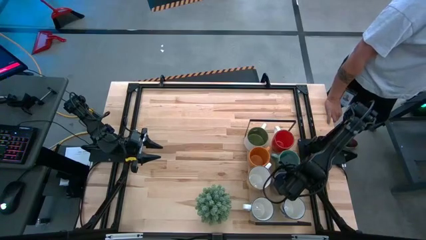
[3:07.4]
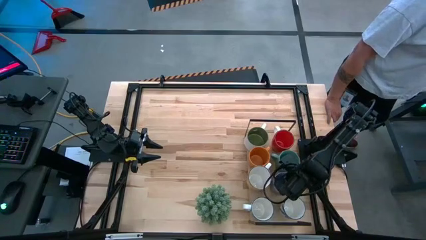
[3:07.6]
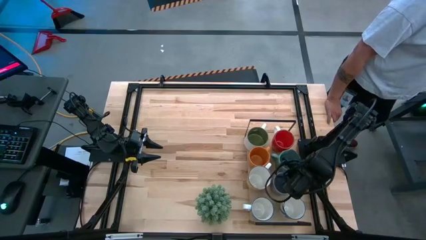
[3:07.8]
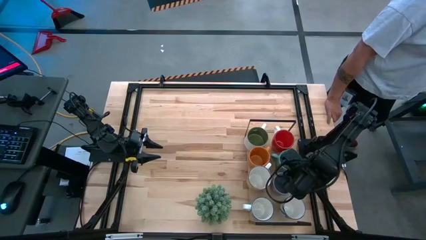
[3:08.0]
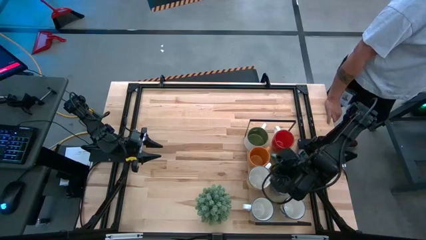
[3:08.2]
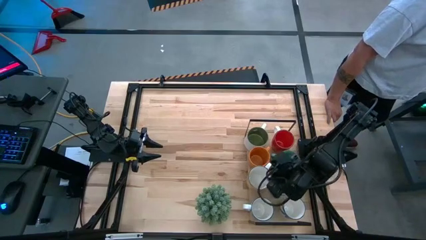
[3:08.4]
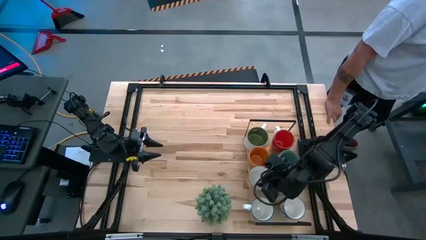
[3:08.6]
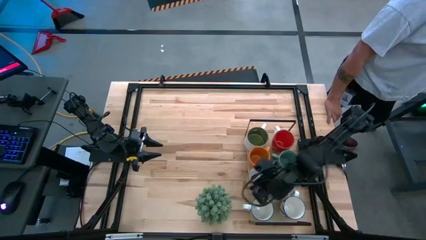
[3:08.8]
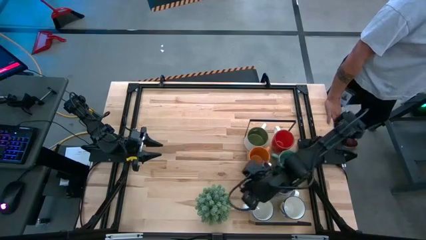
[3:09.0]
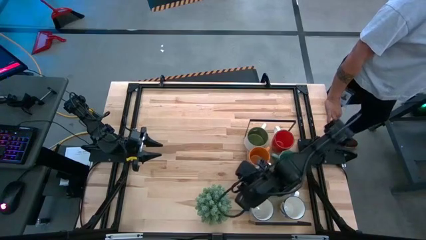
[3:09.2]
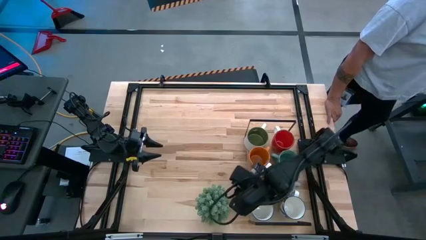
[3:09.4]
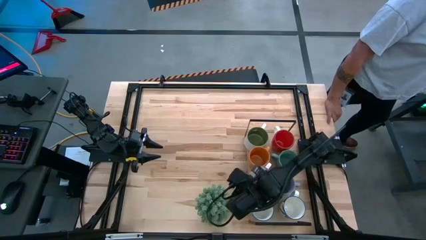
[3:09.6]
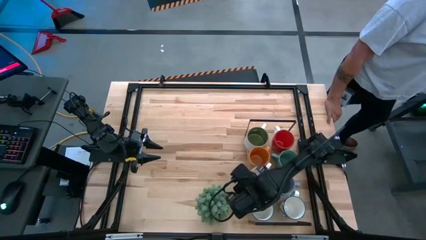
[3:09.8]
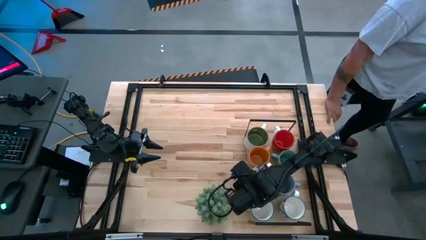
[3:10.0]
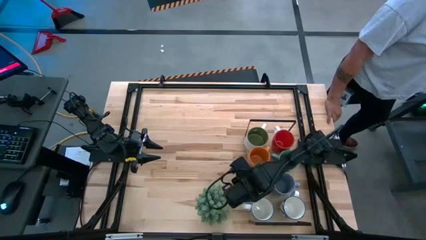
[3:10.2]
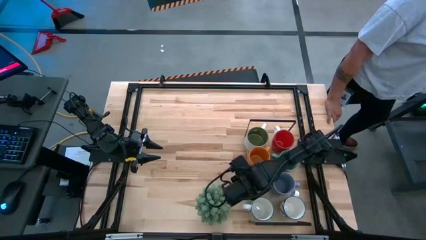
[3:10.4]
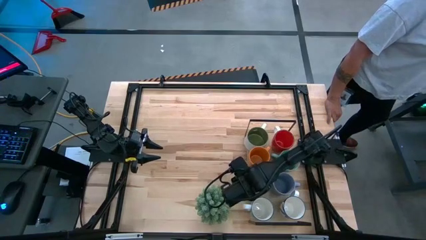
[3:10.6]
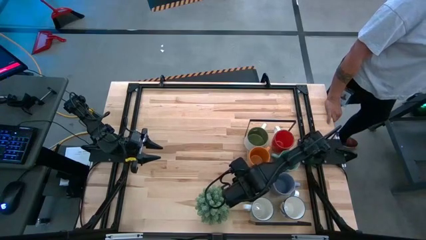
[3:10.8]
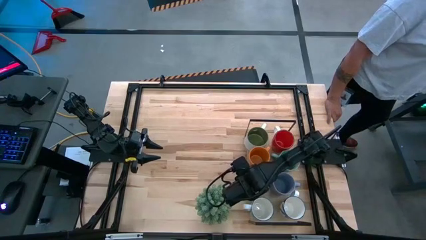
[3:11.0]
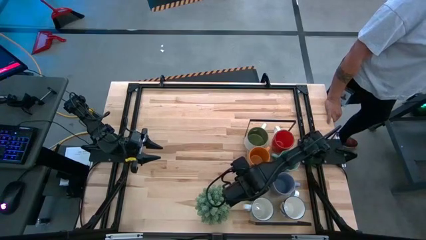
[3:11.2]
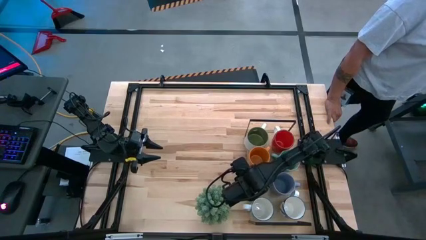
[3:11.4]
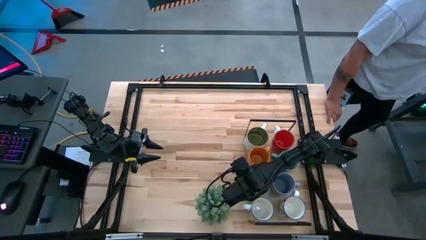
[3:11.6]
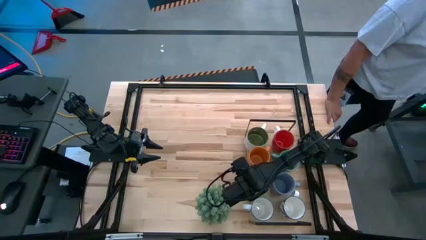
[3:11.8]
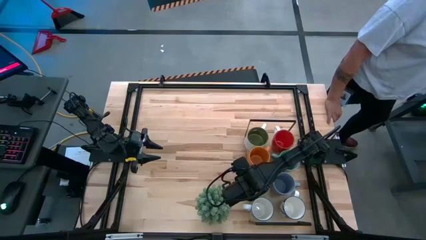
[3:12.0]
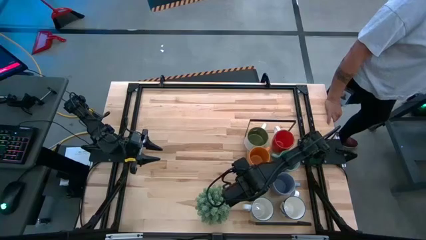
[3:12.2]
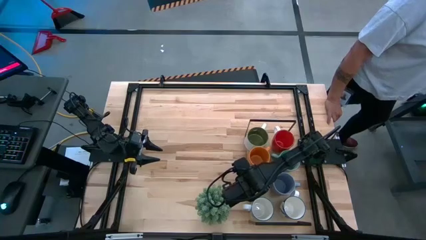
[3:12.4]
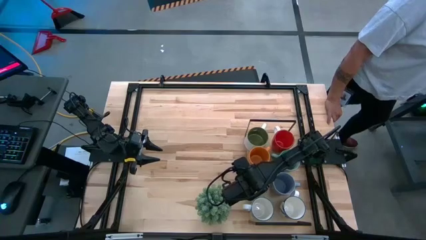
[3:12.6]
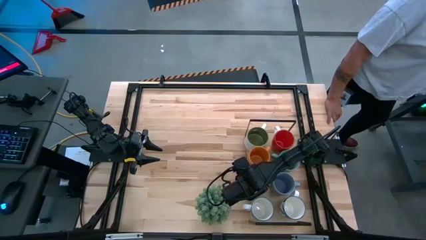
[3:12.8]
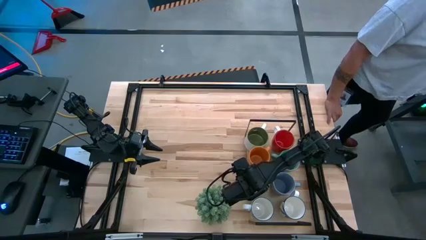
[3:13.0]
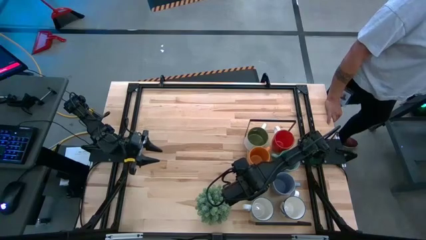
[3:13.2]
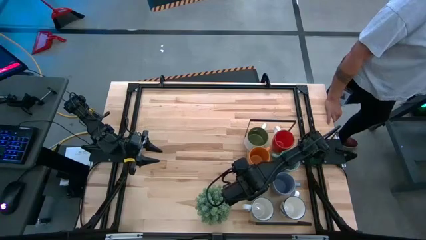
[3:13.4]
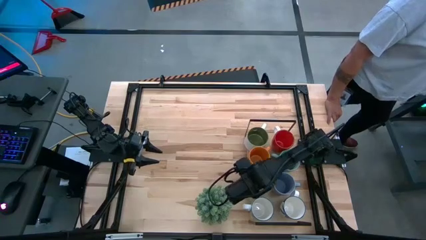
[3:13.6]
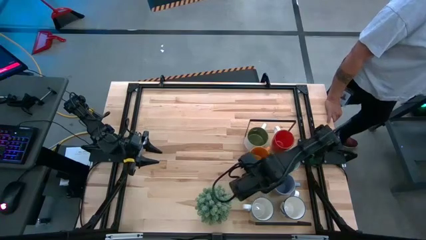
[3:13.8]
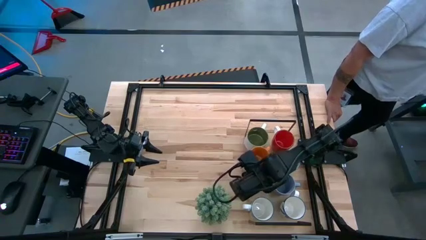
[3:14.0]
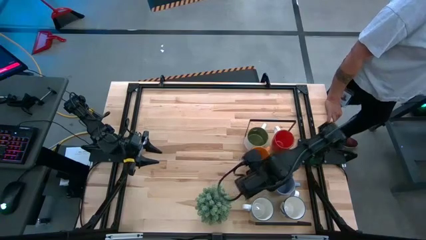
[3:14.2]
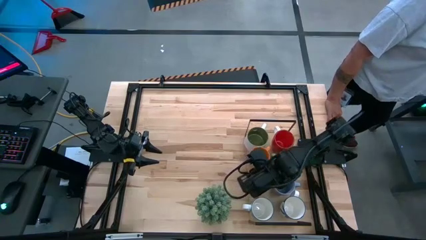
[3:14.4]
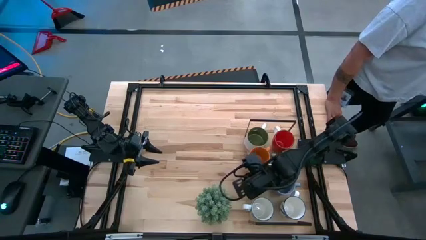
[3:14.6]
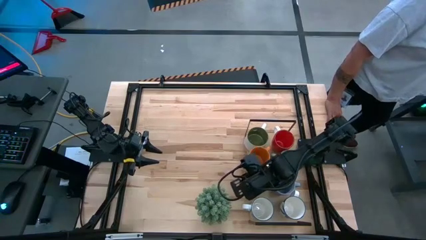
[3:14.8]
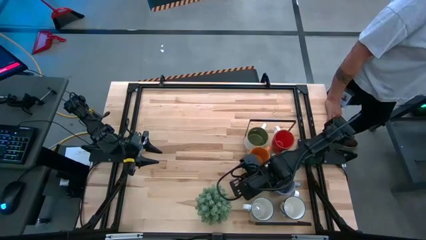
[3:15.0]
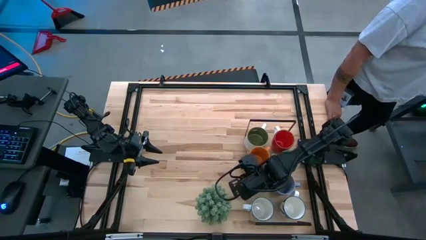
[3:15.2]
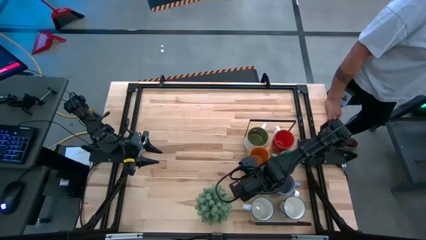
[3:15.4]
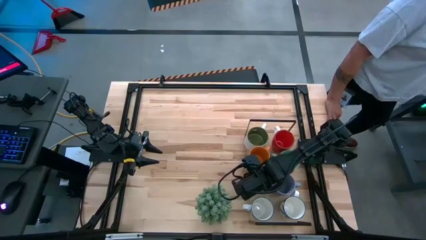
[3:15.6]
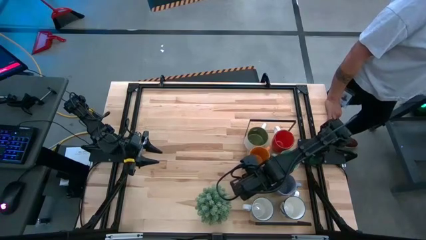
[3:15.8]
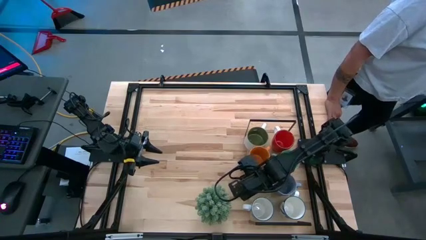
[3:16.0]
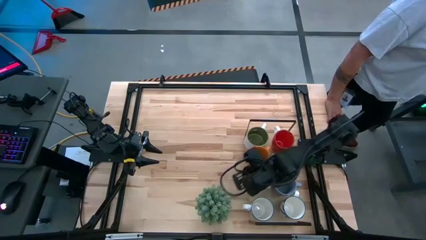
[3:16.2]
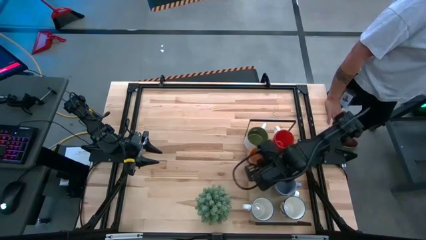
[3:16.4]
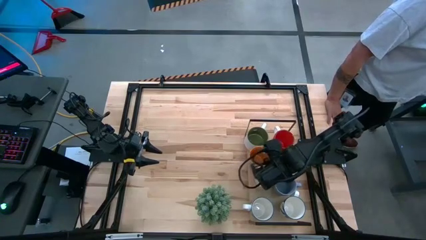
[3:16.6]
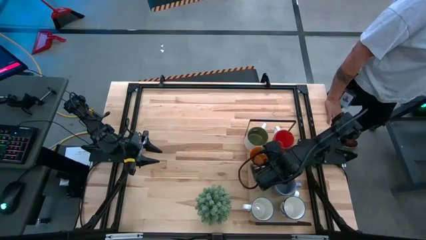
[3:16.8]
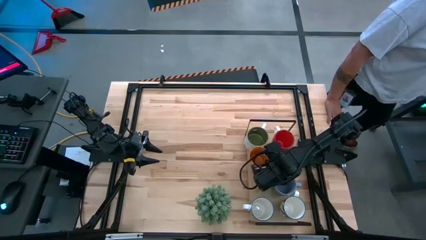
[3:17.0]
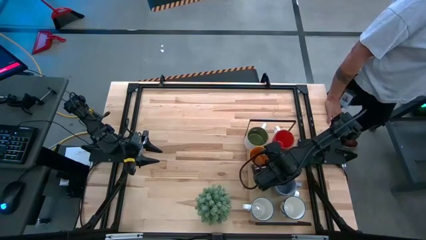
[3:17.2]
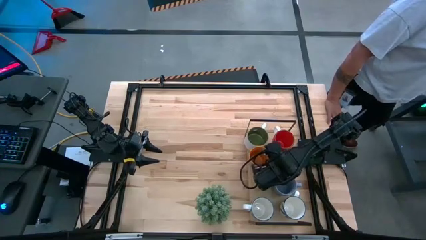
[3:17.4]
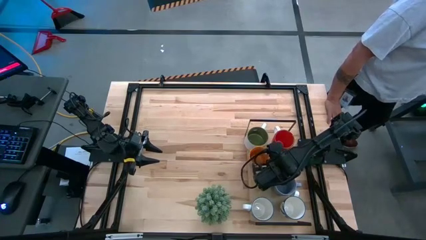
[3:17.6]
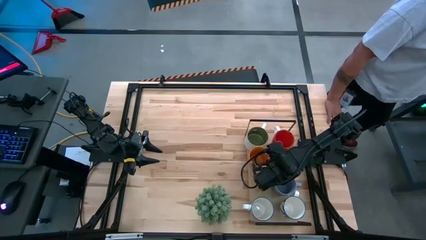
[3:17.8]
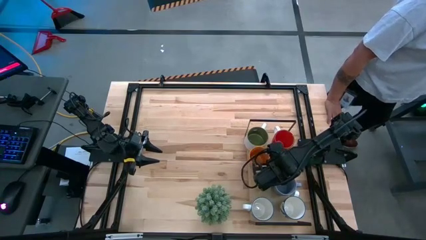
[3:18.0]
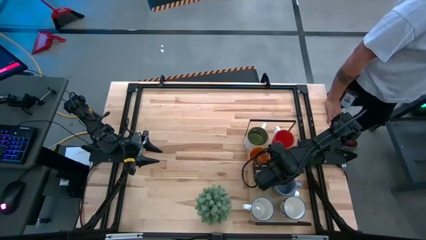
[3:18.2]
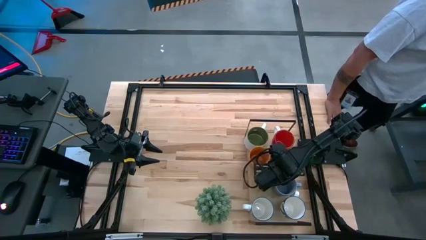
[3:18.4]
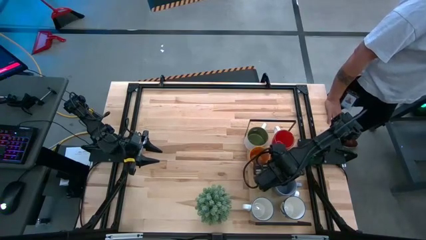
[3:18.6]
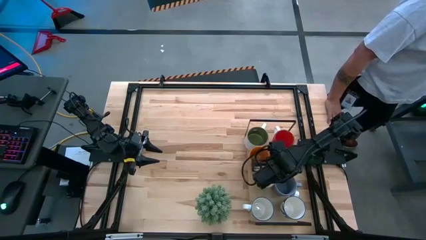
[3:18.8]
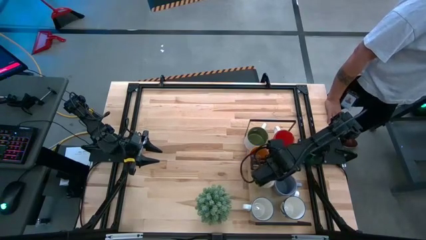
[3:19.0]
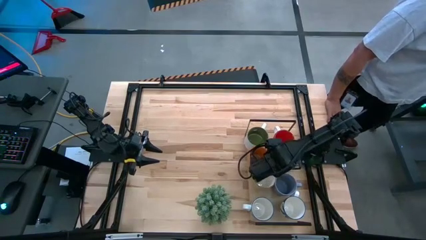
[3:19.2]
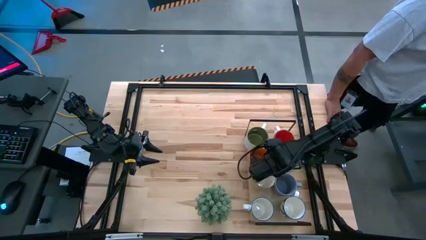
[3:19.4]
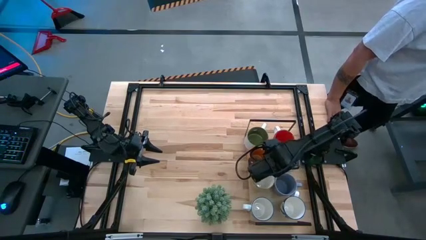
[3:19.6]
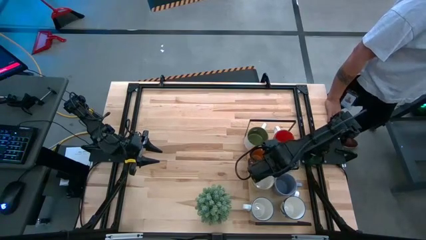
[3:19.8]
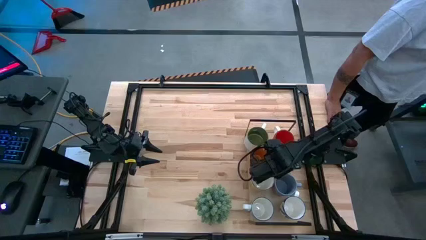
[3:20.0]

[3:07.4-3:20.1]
Task: Place coffee mugs
Adjust the mugs on the shelf

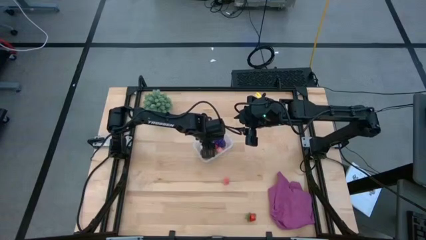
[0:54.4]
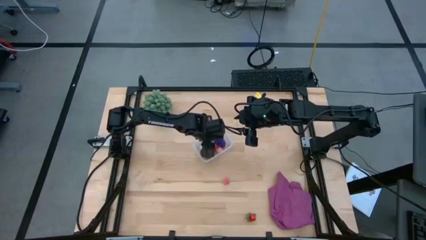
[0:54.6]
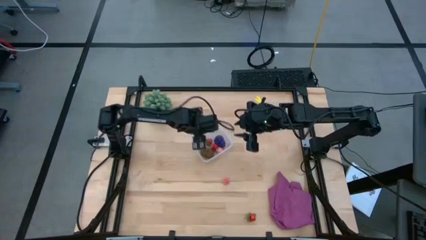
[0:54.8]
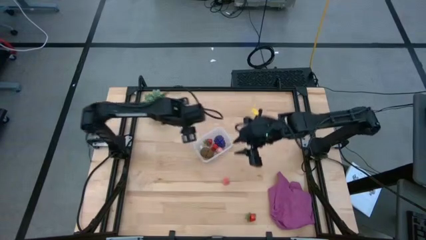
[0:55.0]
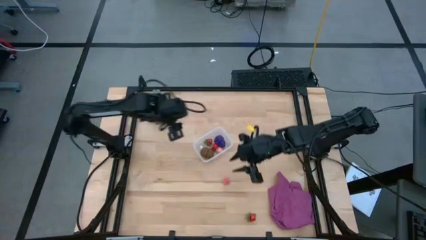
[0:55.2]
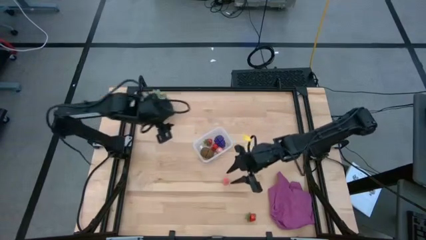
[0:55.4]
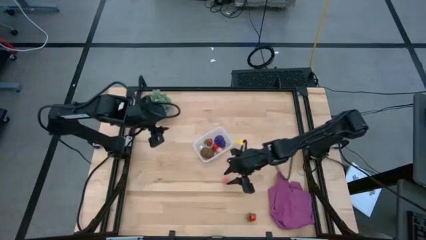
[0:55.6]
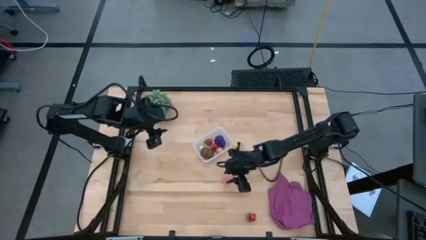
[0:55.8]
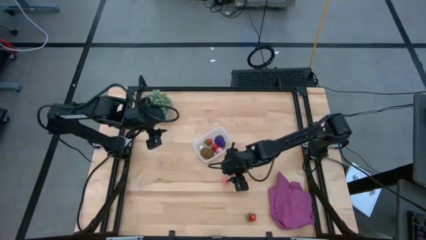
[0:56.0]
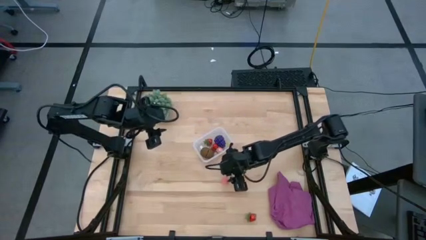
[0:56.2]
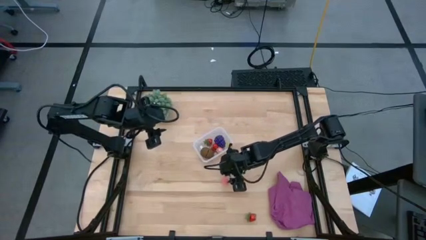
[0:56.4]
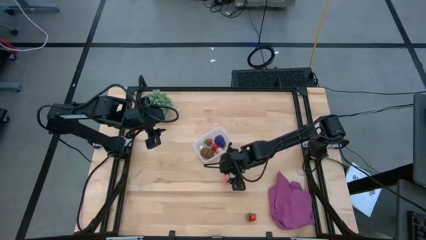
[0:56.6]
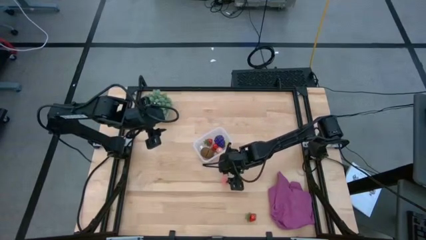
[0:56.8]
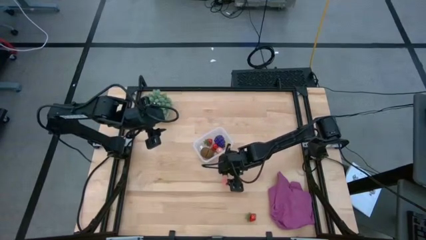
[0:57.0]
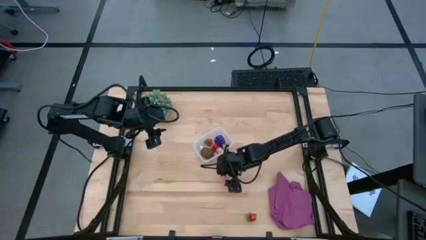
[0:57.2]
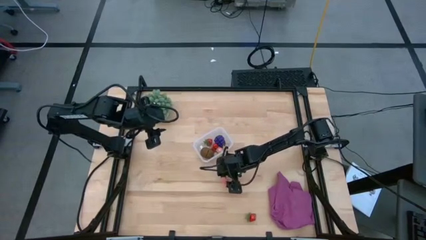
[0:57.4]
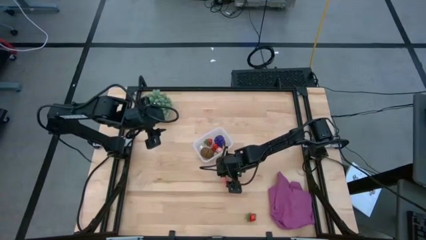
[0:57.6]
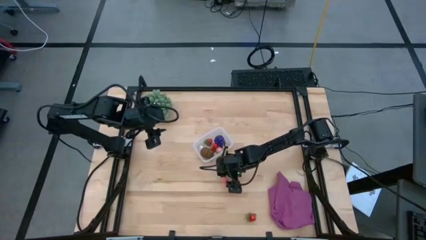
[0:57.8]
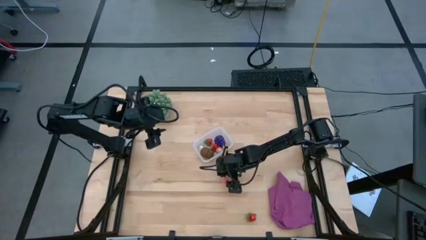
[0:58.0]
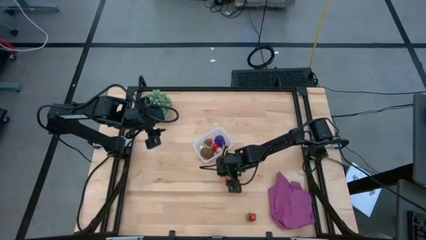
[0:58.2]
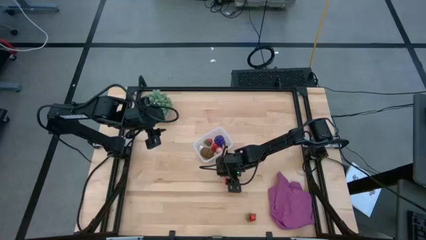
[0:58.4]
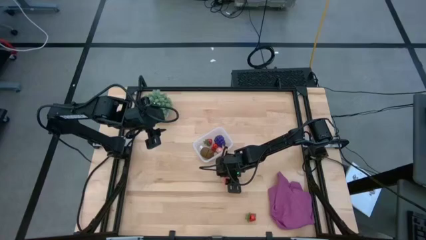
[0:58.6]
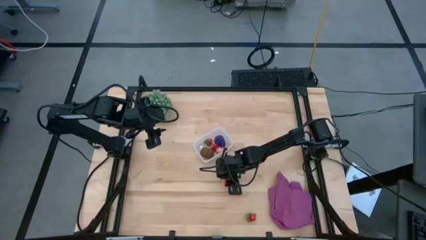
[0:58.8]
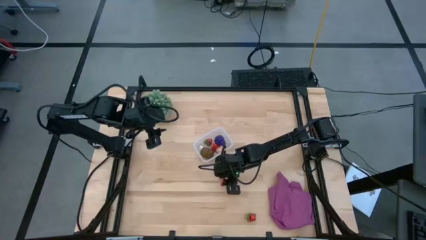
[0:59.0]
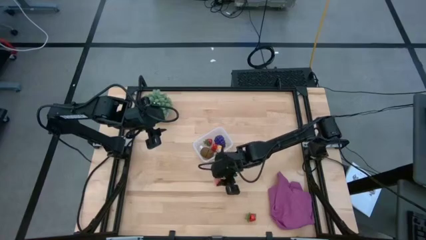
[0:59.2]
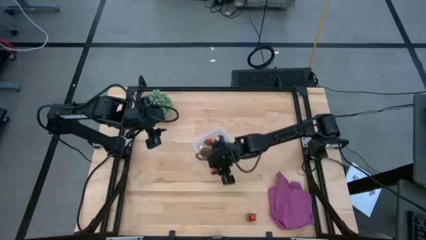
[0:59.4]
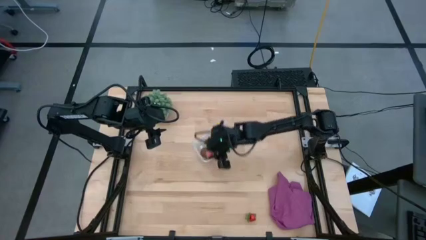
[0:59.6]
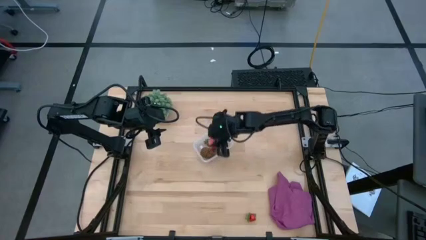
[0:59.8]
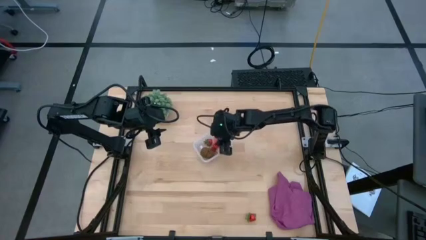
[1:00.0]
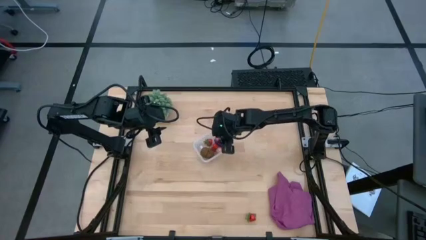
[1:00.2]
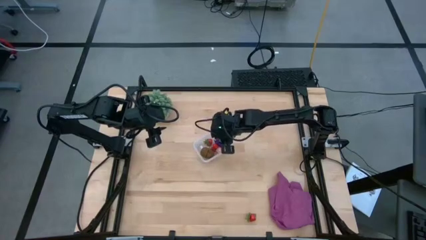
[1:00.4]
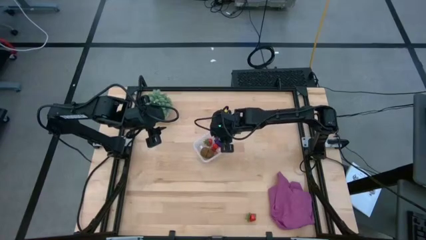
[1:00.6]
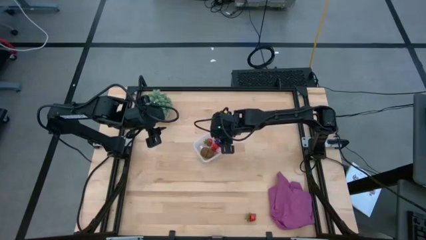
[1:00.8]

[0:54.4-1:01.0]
Task: Pick and placing Produce into tupperware
Put the peach into the transparent bin
